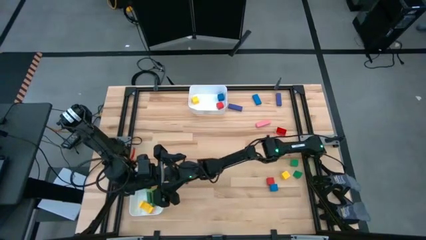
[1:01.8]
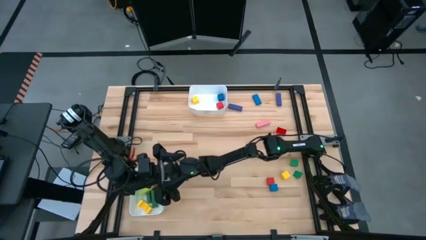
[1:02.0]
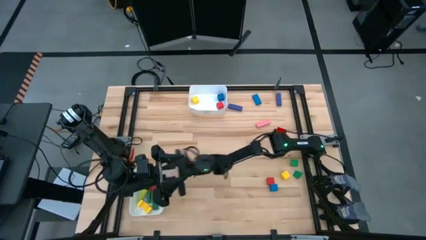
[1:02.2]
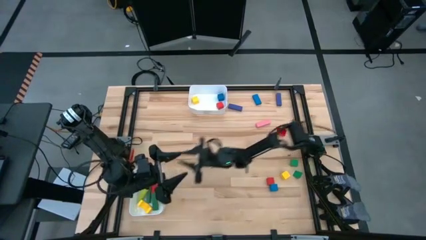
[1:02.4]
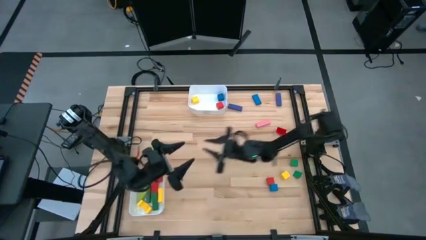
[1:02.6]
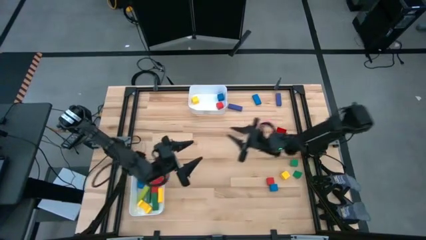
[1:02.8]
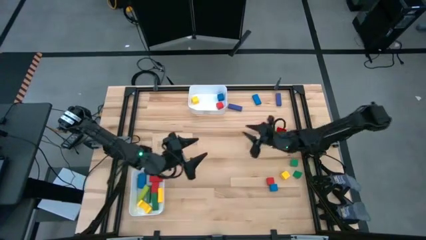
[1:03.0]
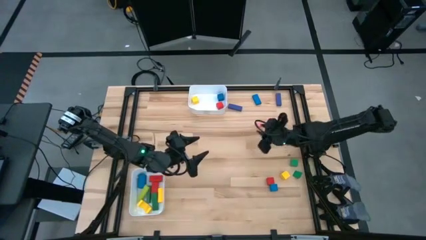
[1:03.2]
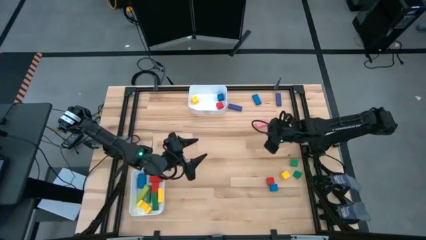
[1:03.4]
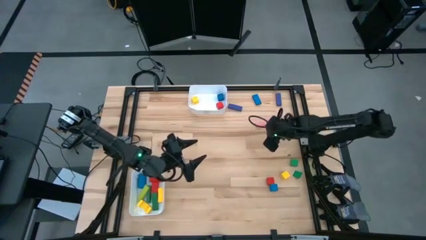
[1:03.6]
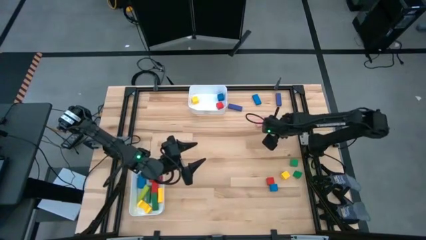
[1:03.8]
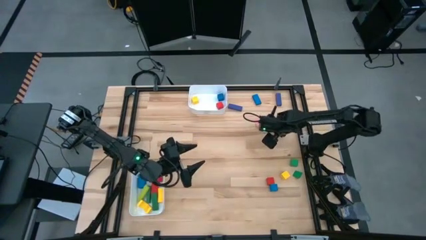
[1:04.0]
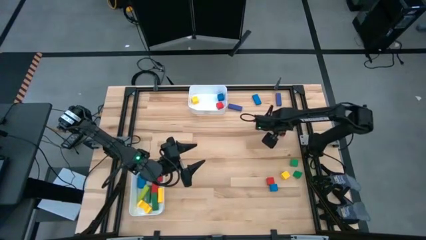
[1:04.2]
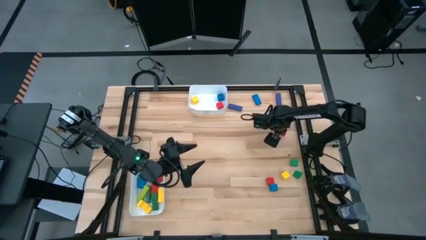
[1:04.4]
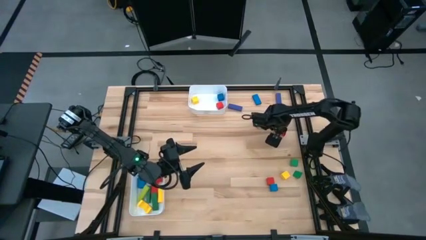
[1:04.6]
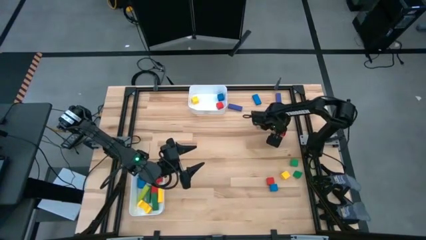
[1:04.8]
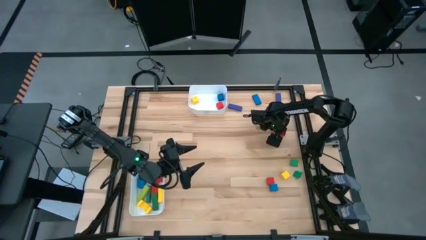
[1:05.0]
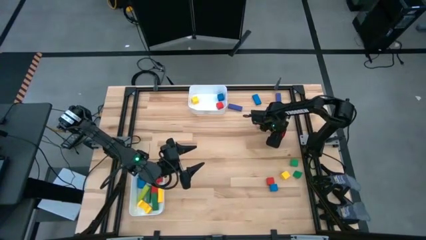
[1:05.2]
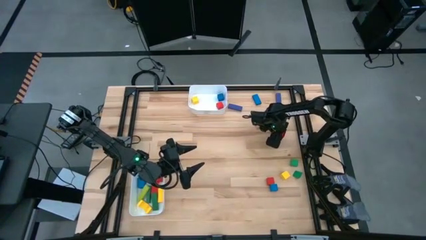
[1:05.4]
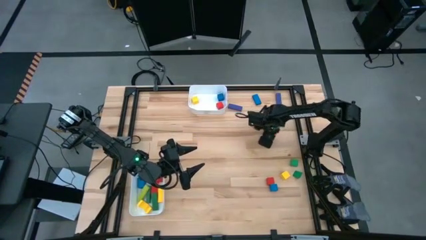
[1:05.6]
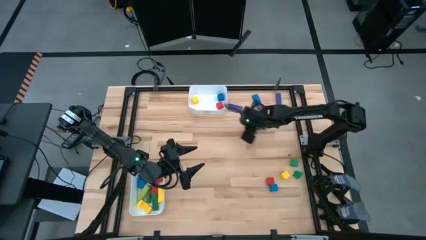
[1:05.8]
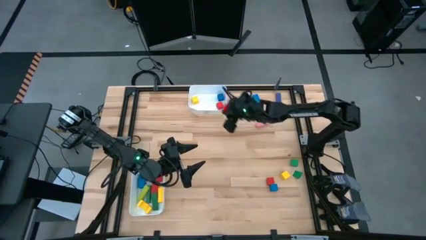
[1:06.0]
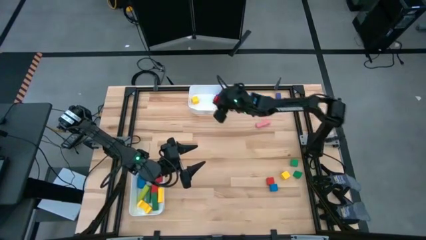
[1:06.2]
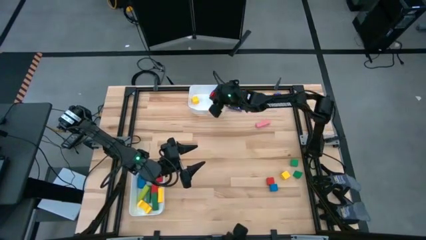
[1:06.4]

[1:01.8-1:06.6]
Task: Sort blocks by size
Put the red game piece into the top white bin

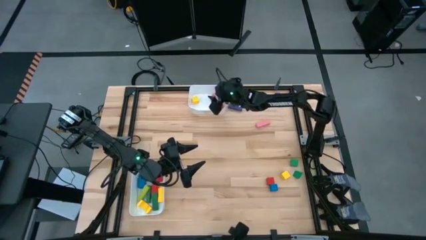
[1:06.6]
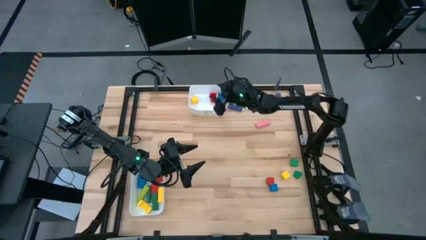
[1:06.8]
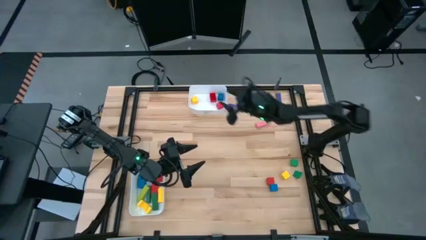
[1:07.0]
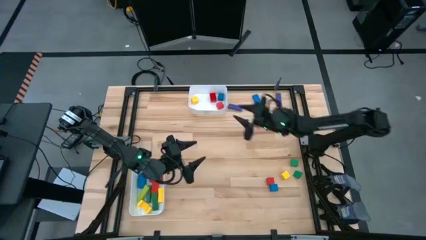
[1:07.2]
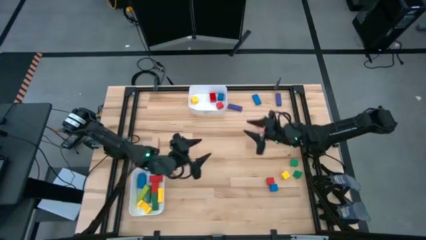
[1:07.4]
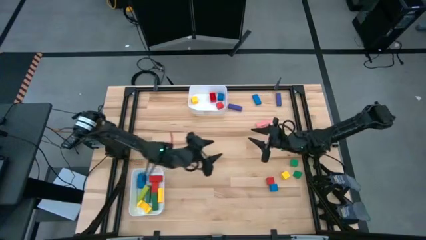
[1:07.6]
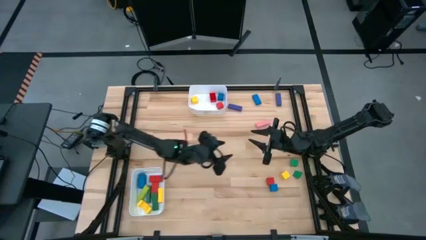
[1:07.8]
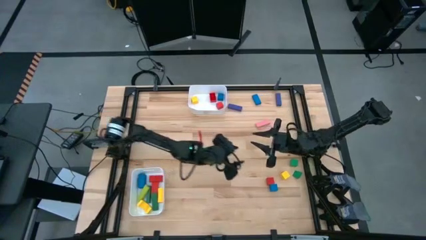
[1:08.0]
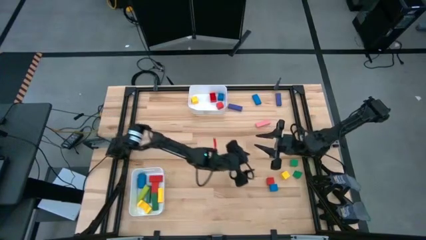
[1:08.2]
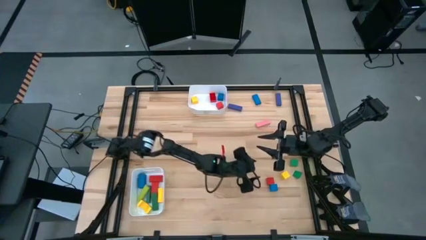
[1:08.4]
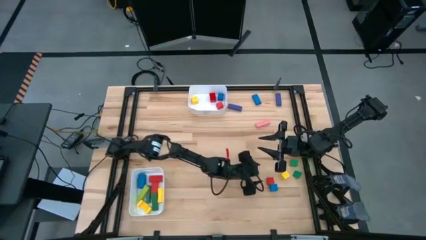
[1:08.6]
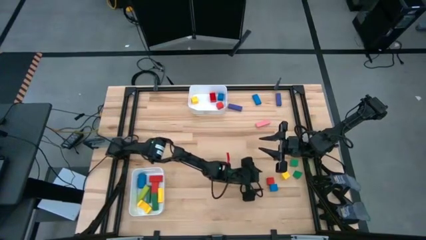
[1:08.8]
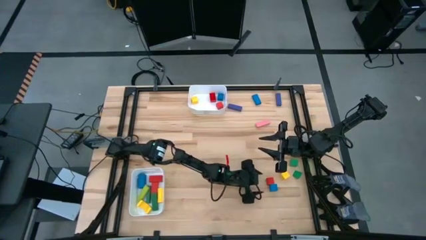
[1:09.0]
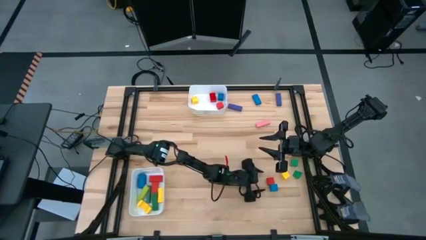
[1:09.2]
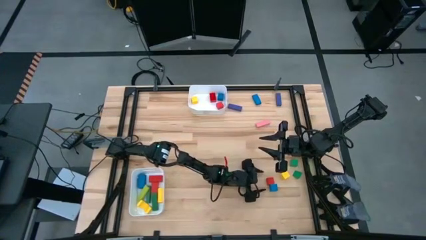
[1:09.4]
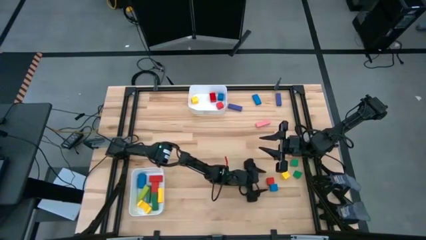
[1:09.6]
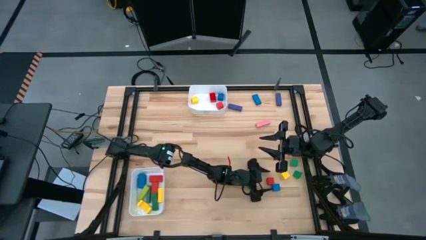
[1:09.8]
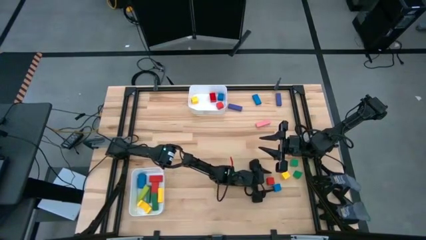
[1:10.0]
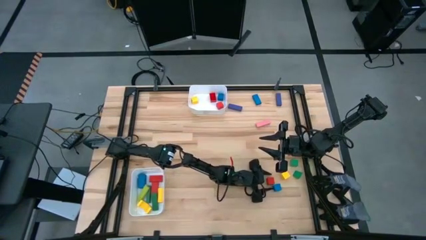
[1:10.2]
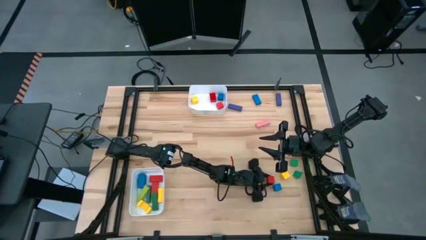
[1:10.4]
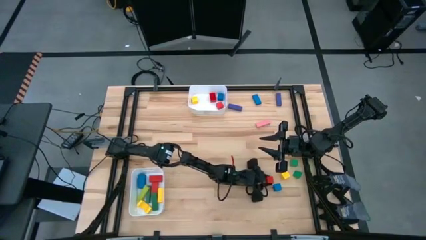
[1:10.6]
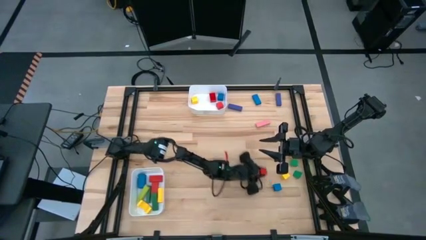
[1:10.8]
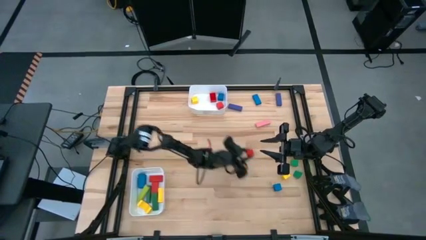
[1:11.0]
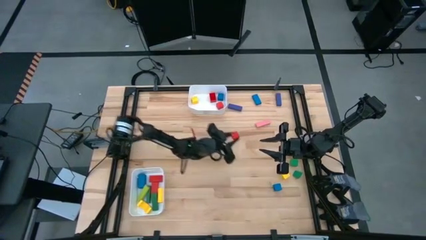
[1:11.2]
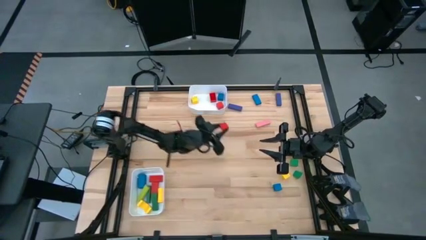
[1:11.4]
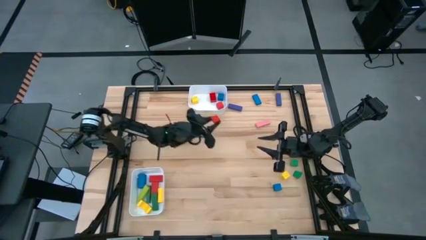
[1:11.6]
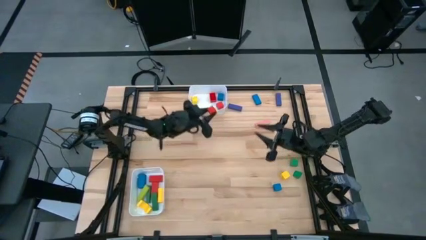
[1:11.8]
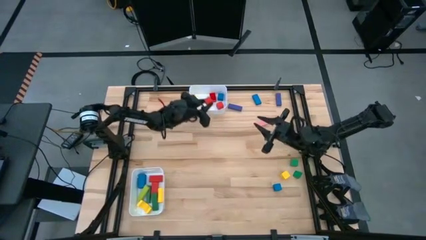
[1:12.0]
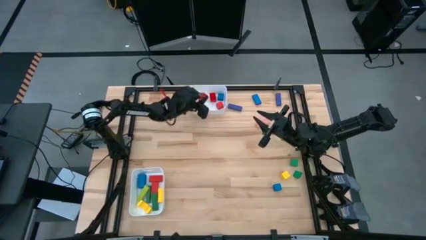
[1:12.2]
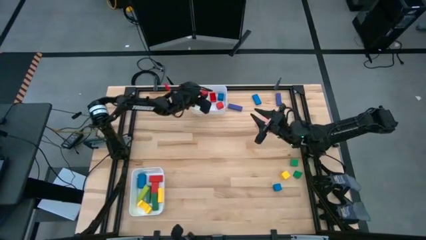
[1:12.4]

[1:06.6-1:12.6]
Put the red cube block into the top white bin

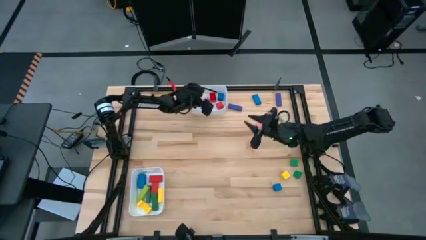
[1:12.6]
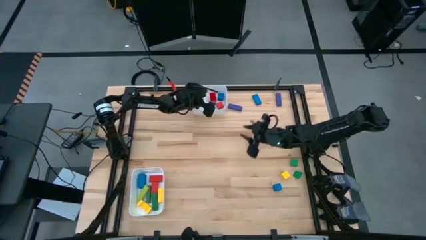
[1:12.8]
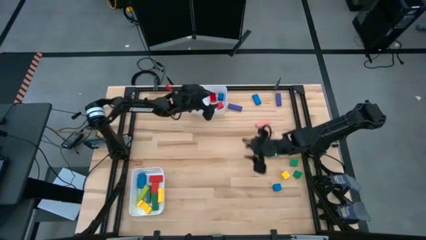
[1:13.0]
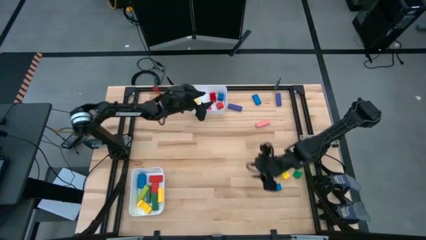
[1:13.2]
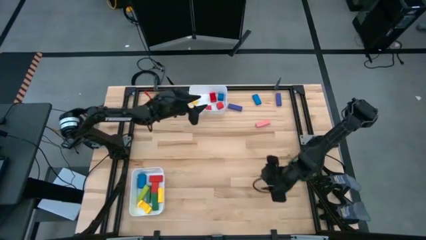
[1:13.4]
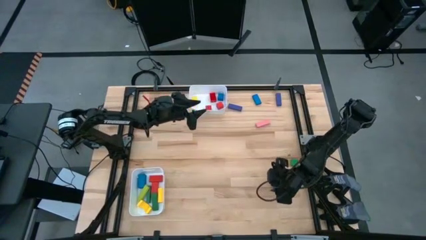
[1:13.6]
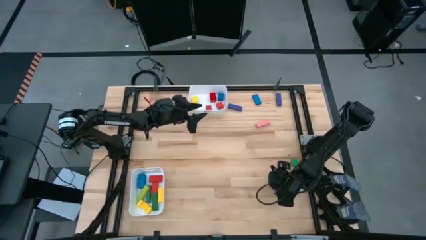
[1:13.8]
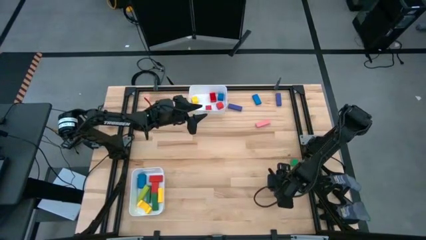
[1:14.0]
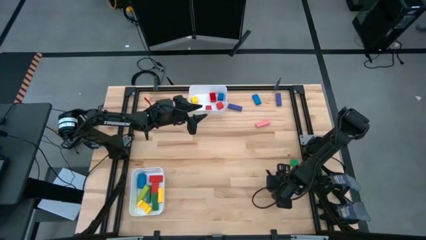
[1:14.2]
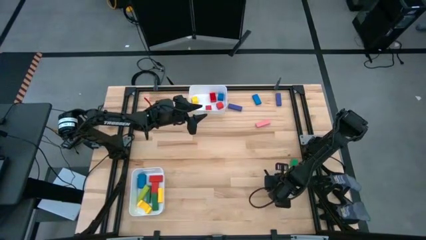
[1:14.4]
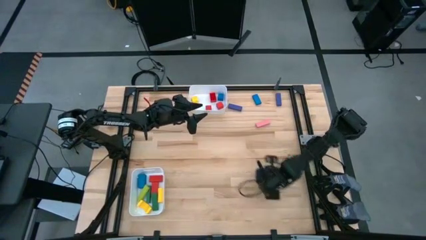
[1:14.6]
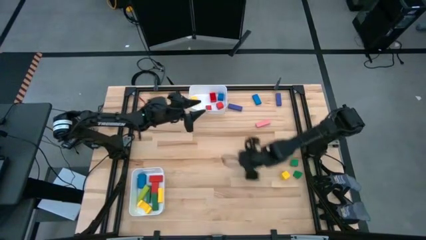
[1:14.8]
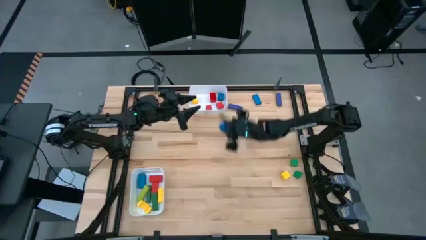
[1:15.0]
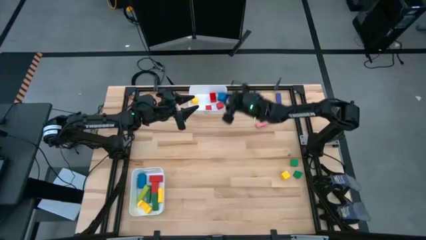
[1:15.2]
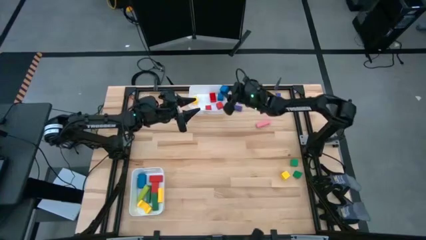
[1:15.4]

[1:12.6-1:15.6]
Put the blue cube block into the top white bin

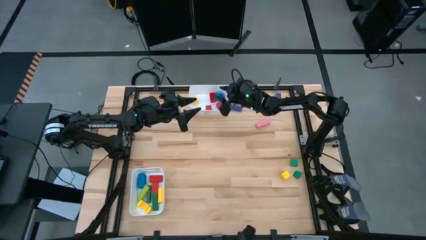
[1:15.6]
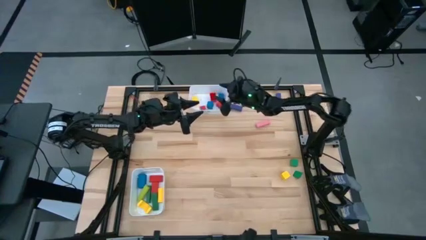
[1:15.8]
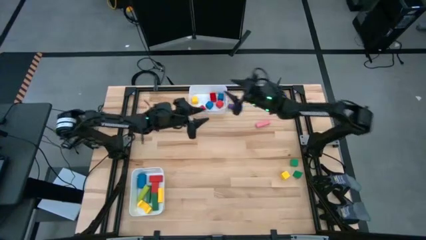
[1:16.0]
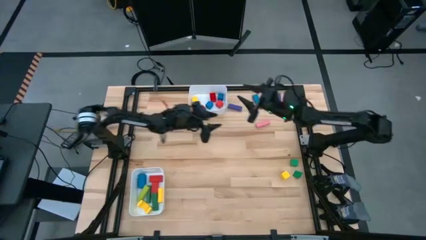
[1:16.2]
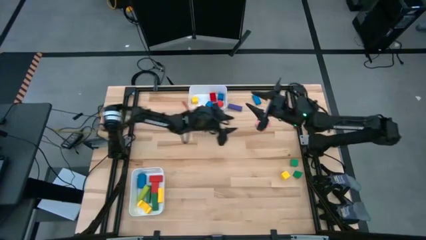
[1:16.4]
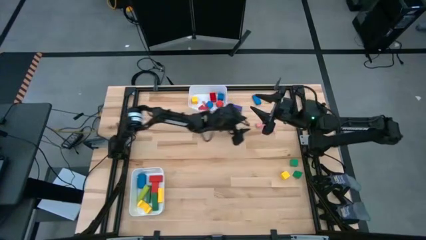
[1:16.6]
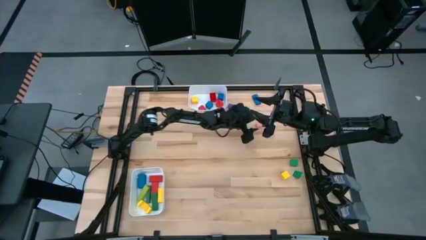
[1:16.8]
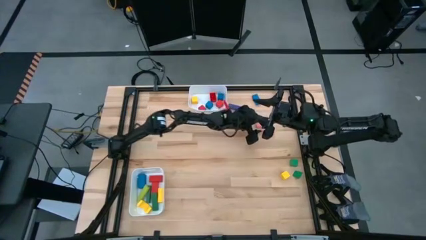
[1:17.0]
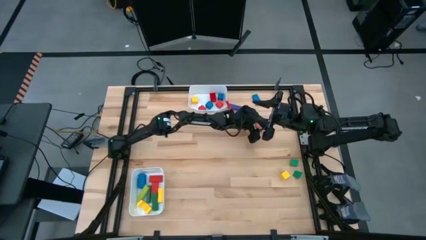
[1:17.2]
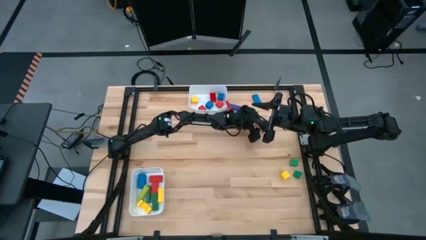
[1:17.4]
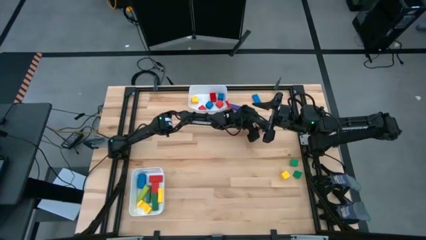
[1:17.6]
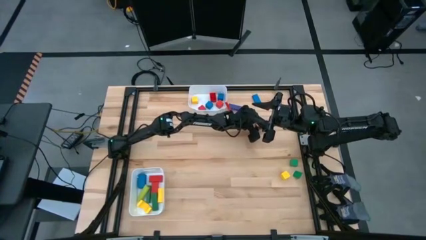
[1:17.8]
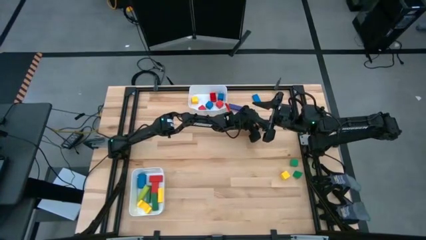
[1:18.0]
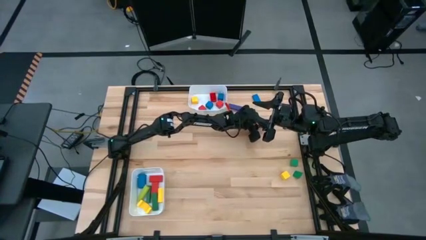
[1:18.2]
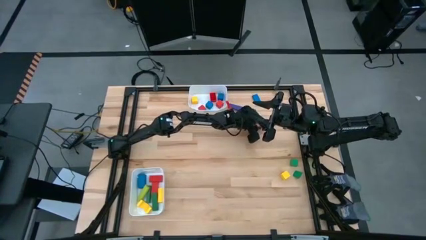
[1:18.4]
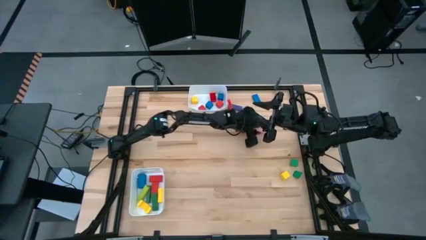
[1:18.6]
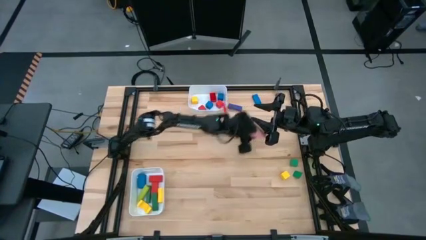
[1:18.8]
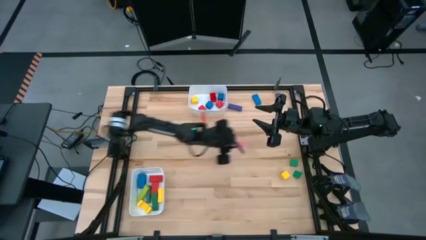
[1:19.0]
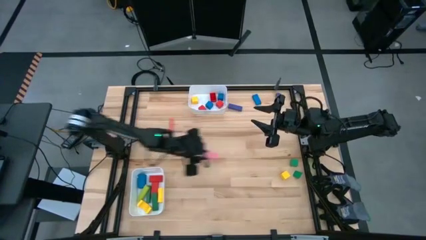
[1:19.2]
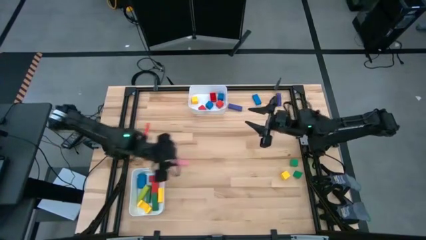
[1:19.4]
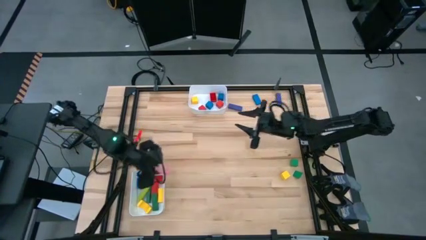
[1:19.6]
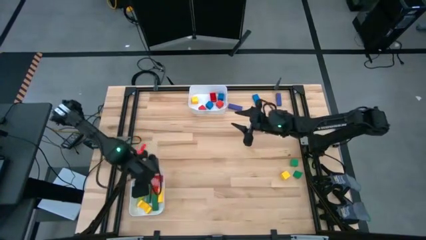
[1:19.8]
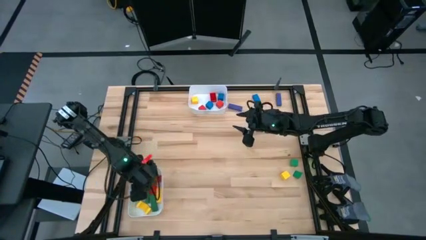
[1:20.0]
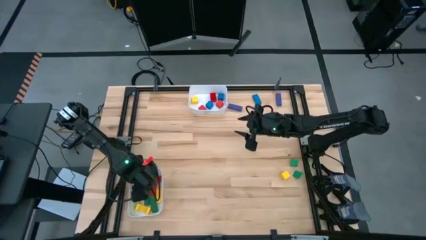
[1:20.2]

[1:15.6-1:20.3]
Put the pink rectangular block into the bottom white bin
